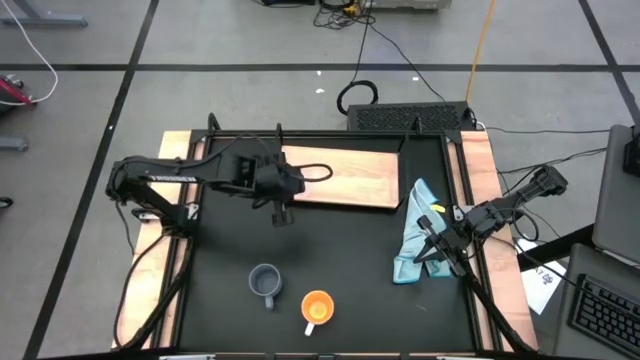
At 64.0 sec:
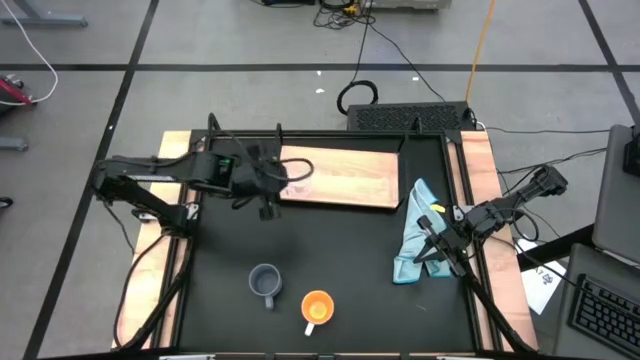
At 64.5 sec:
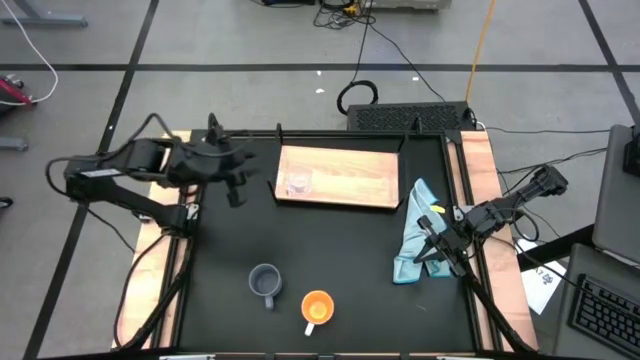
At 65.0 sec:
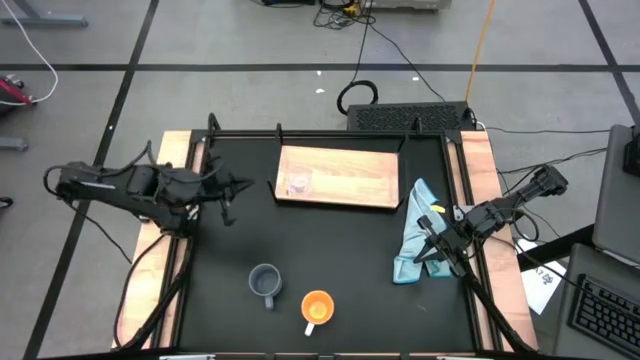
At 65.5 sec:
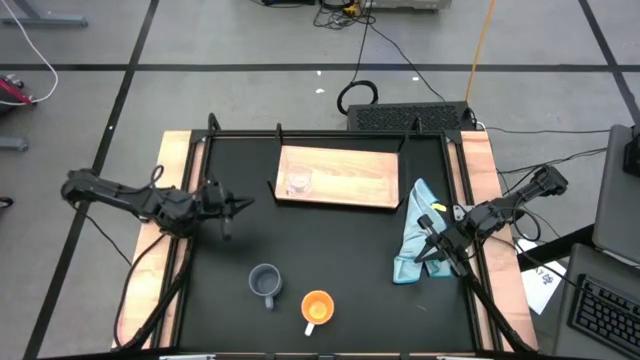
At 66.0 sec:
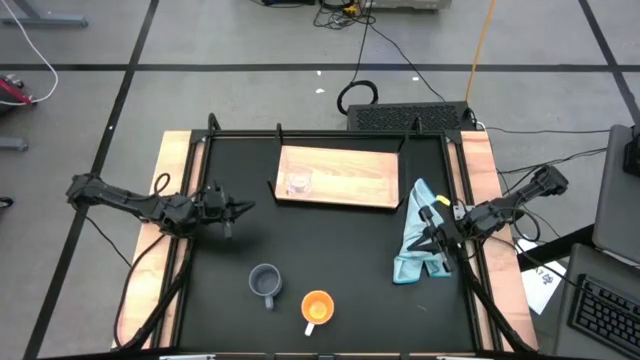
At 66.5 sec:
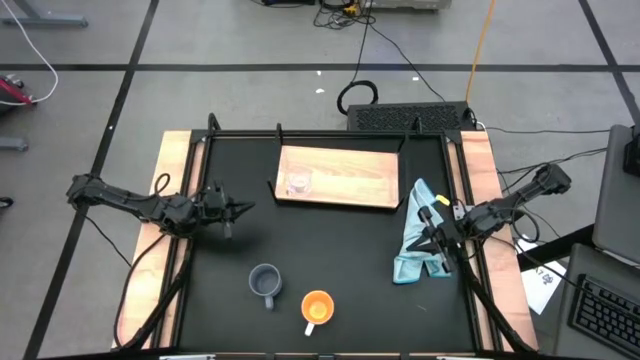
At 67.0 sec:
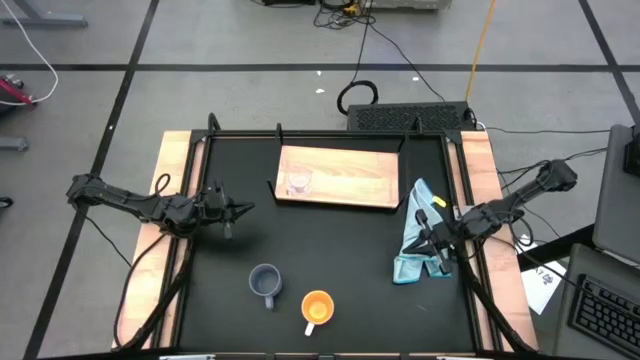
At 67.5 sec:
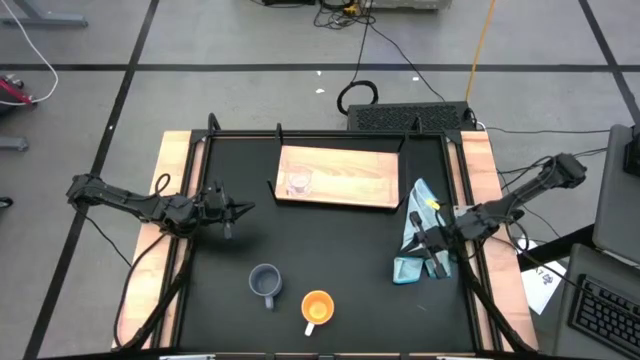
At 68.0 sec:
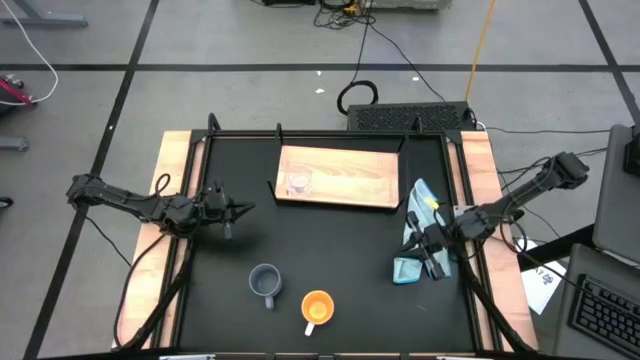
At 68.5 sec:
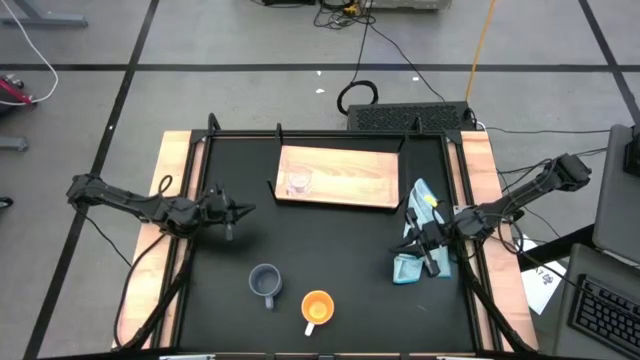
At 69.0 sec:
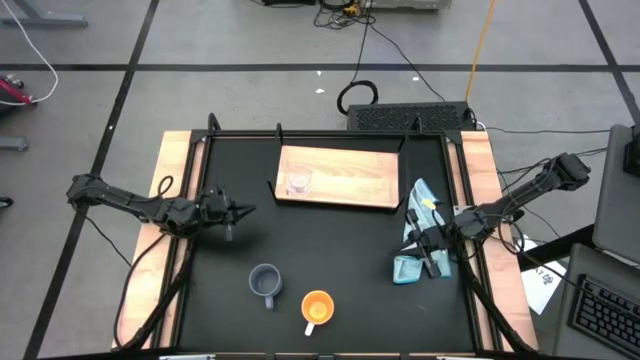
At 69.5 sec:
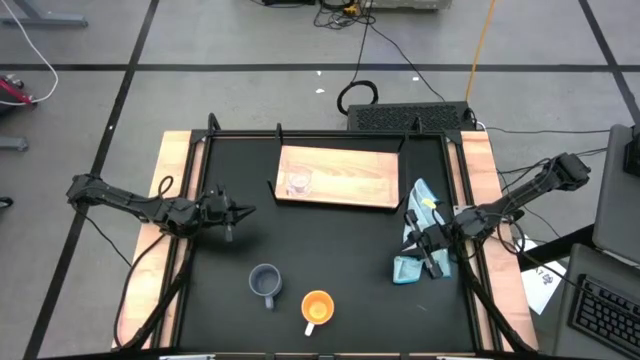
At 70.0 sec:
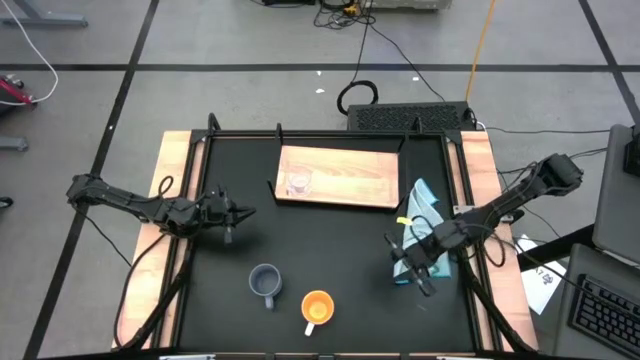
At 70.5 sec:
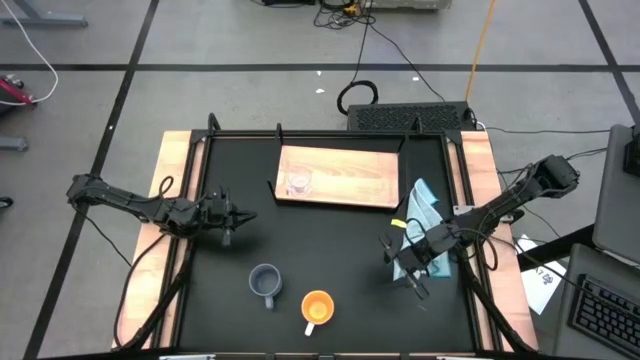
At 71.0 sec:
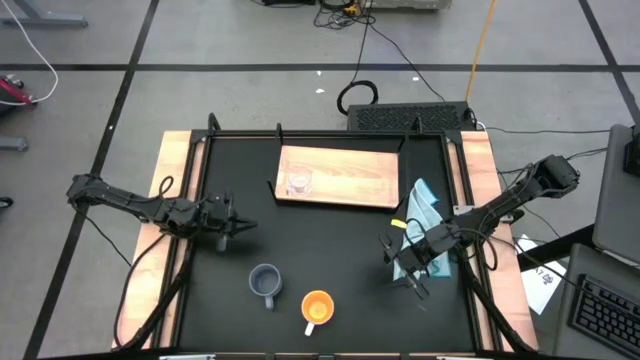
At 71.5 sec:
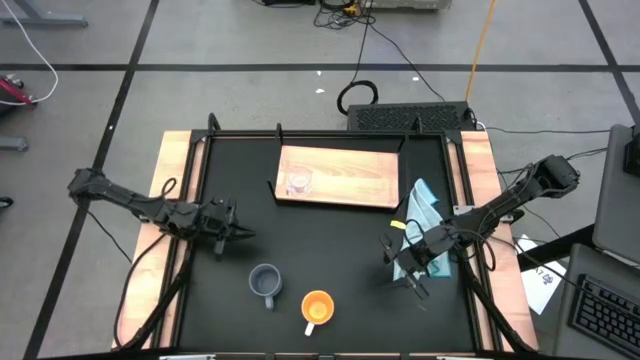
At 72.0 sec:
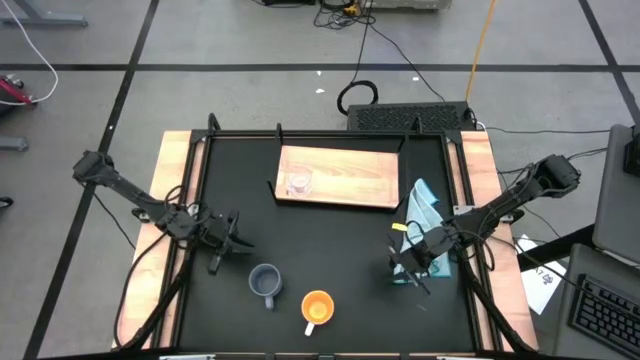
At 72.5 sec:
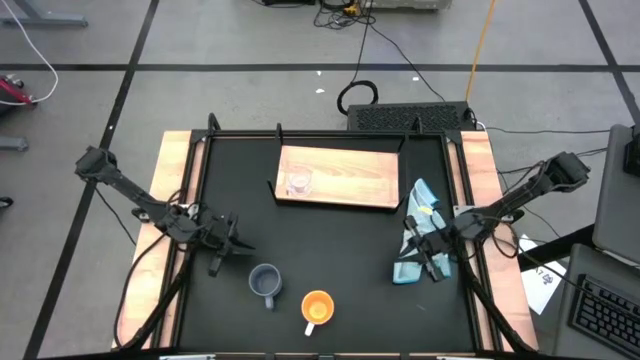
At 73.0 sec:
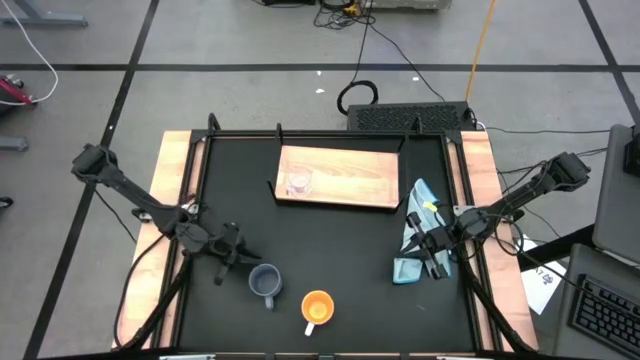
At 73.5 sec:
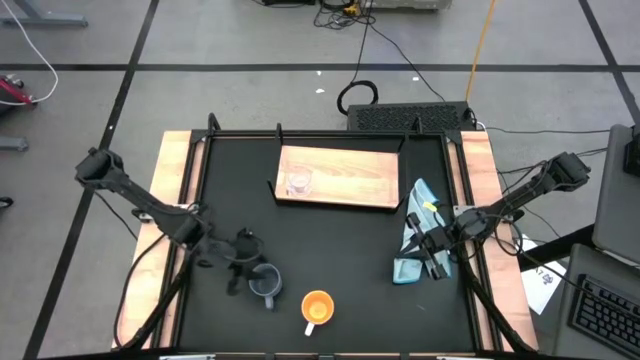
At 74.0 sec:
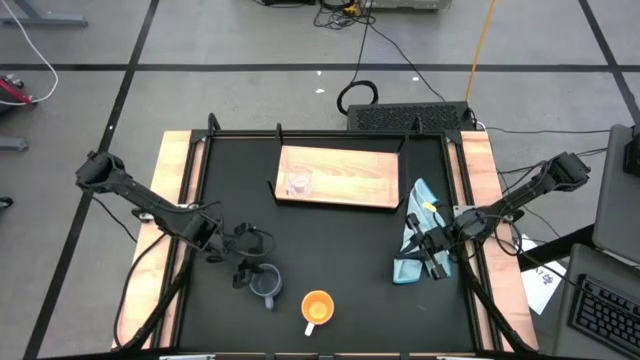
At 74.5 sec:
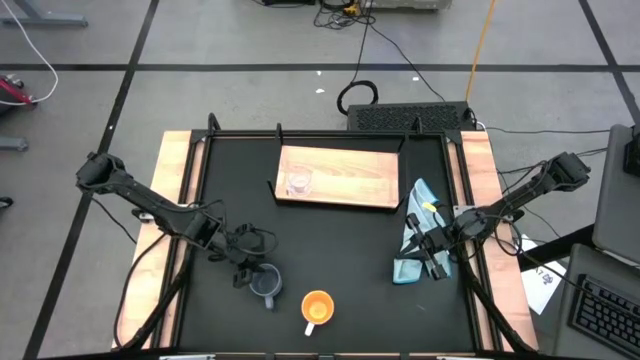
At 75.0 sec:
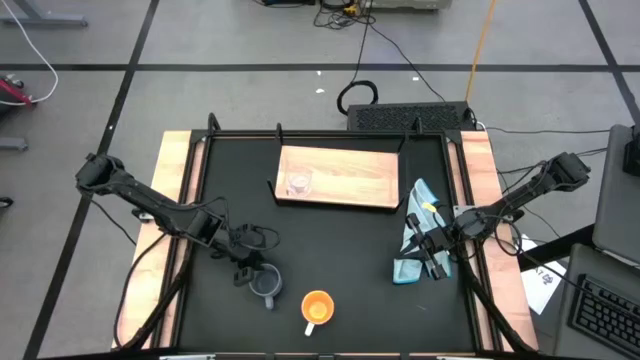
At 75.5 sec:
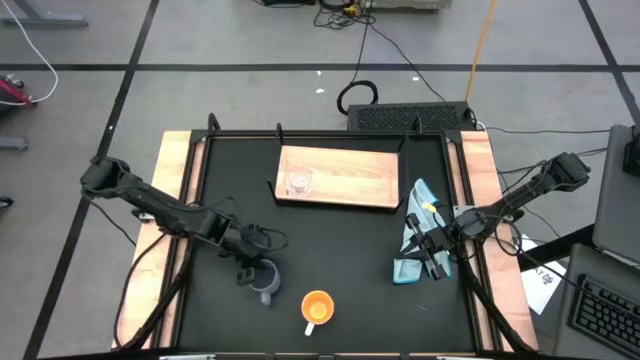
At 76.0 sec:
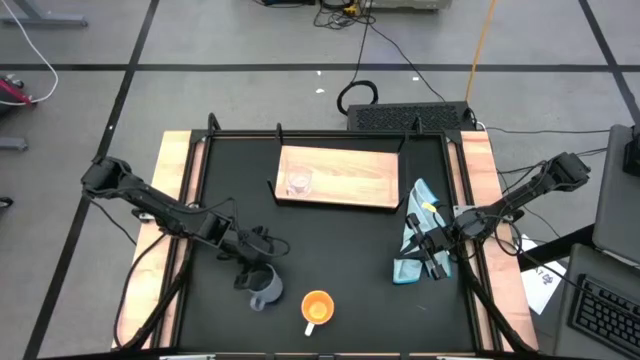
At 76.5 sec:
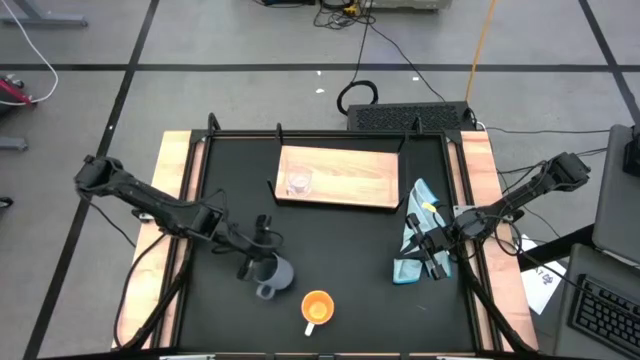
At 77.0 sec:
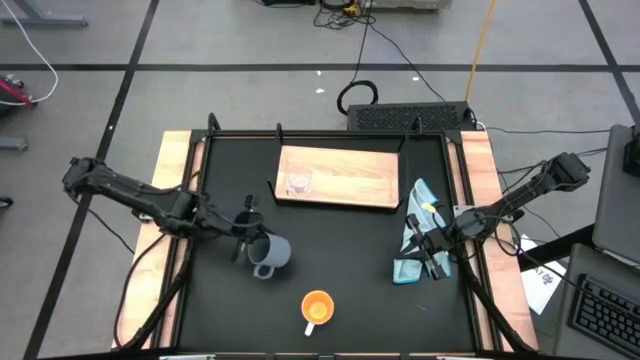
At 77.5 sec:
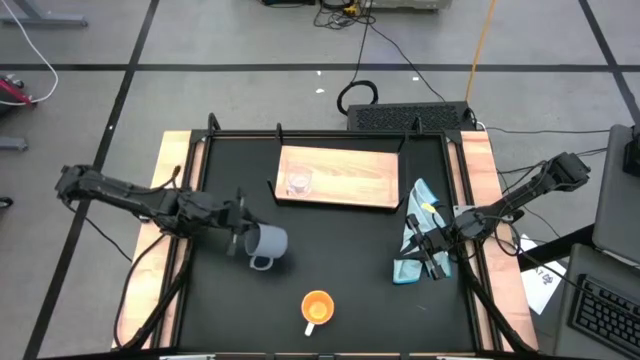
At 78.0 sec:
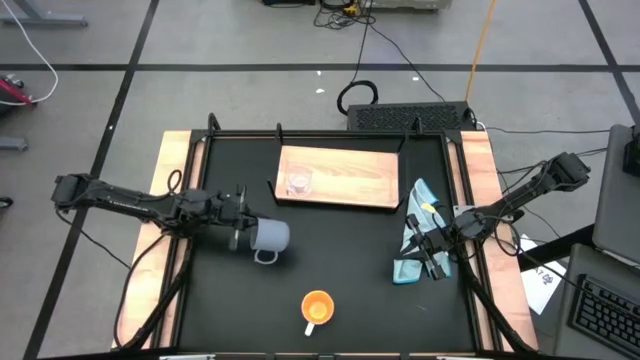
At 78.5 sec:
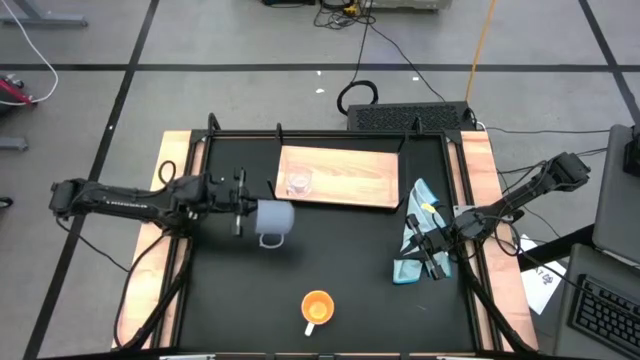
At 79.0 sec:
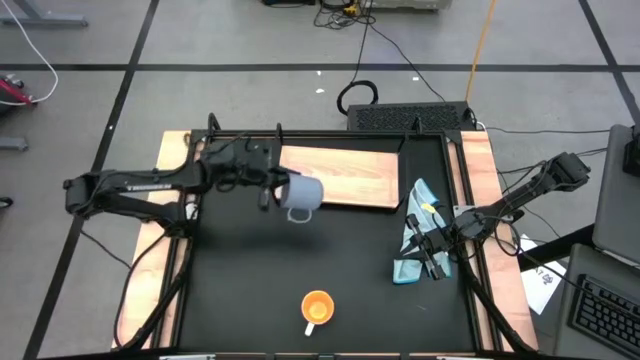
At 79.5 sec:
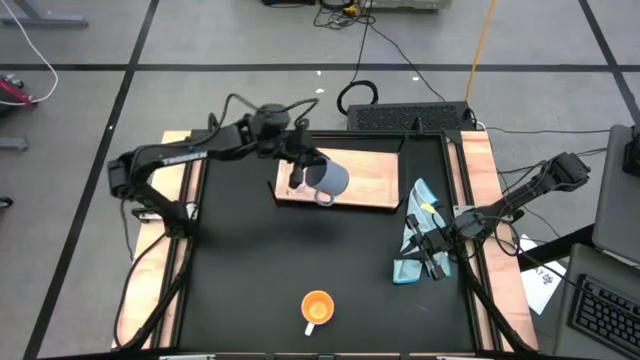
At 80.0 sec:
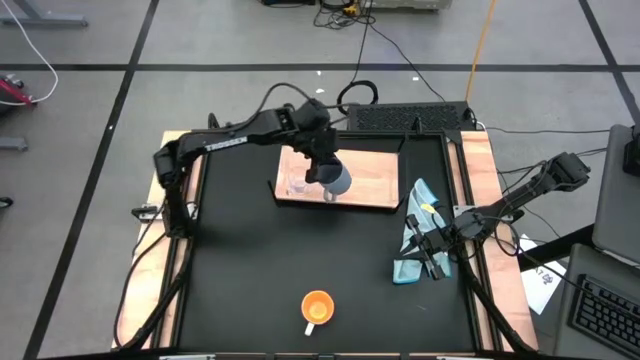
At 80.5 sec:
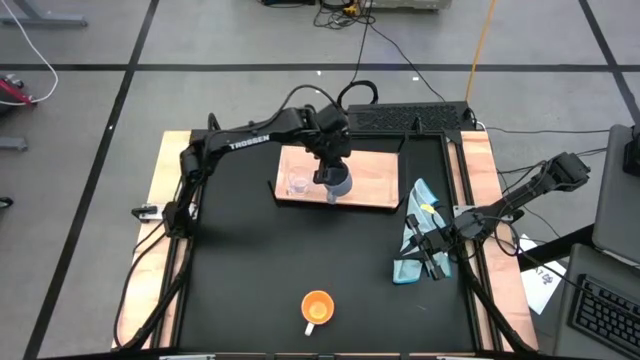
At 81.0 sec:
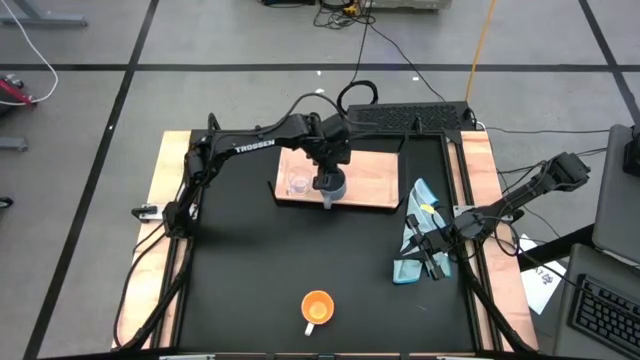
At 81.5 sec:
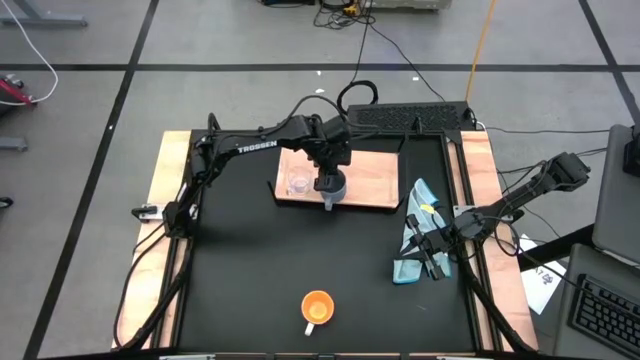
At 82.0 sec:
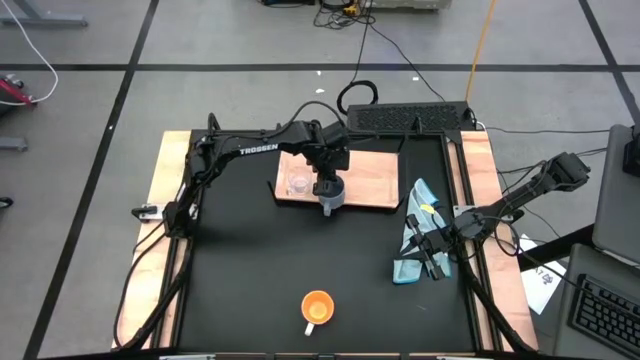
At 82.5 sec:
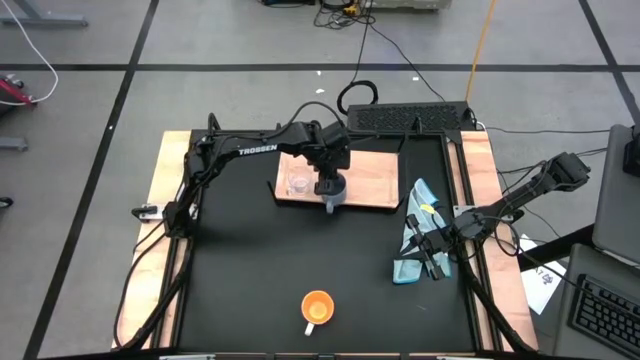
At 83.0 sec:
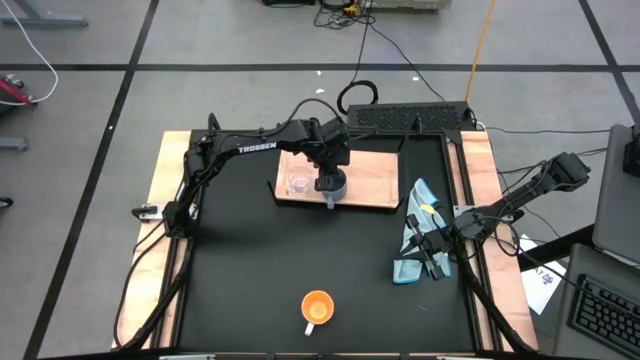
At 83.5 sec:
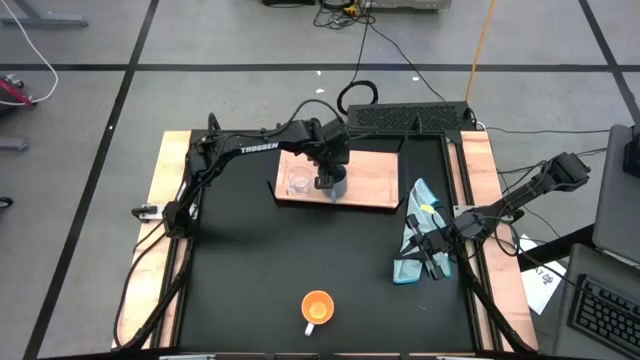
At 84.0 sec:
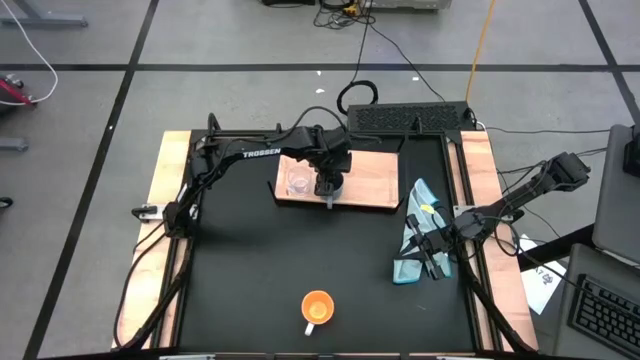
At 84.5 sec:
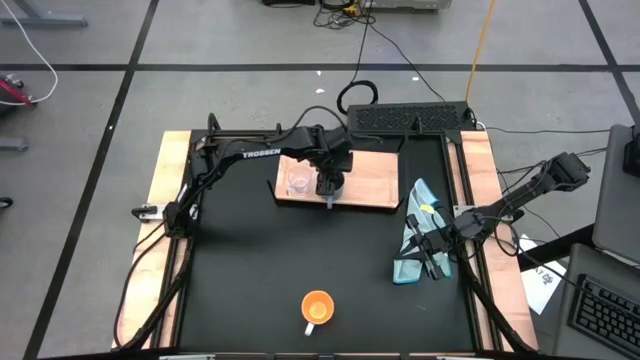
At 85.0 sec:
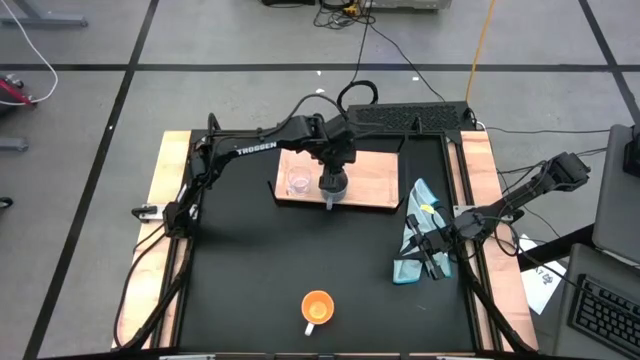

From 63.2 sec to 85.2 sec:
Task: Stack small to large cups/mugs on shelf
Put the gray mug on the shelf
